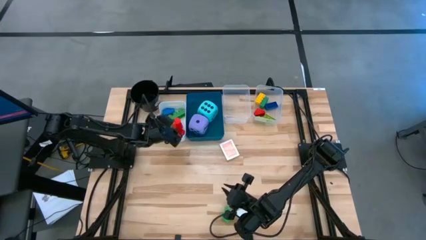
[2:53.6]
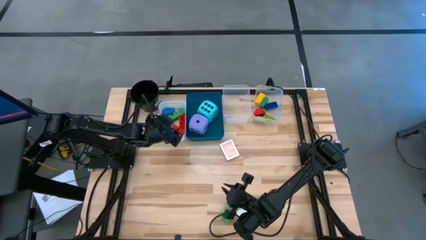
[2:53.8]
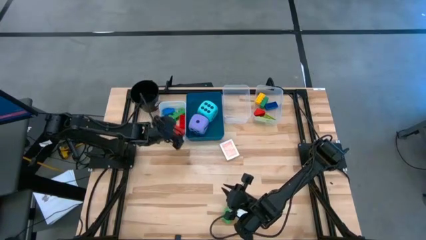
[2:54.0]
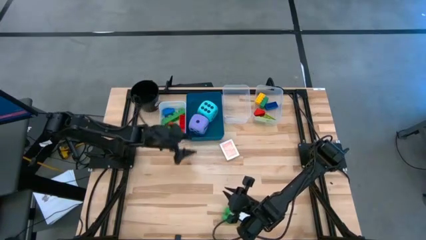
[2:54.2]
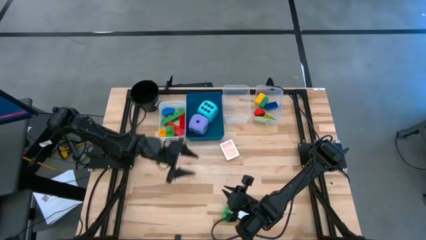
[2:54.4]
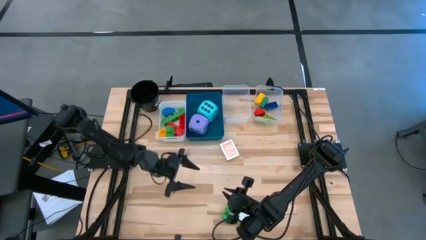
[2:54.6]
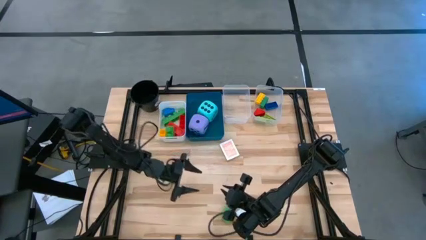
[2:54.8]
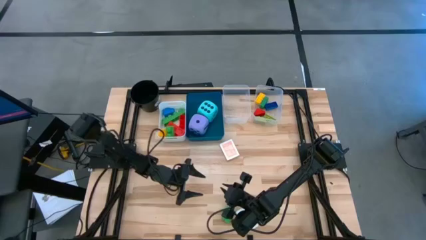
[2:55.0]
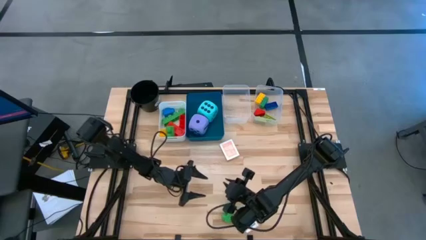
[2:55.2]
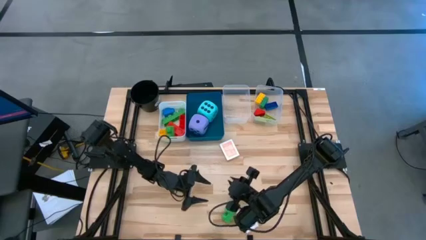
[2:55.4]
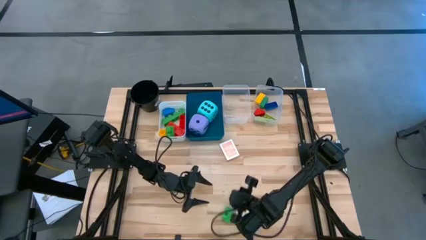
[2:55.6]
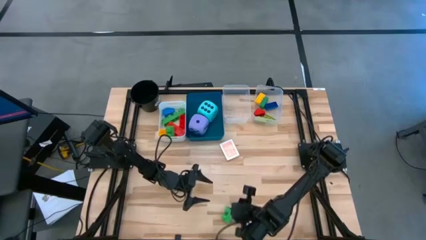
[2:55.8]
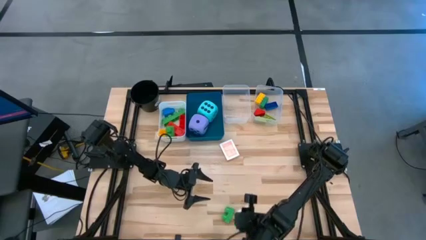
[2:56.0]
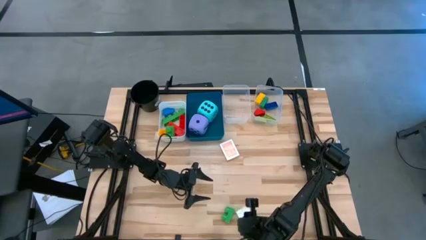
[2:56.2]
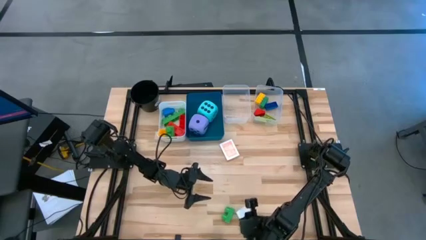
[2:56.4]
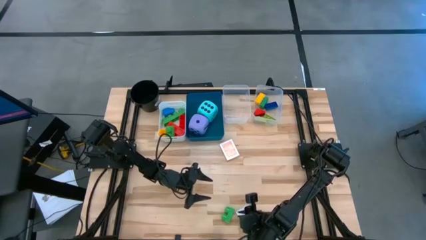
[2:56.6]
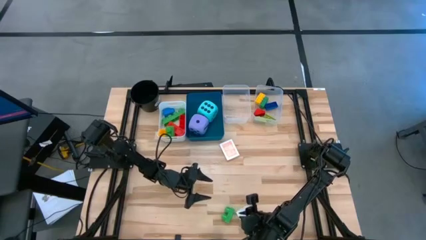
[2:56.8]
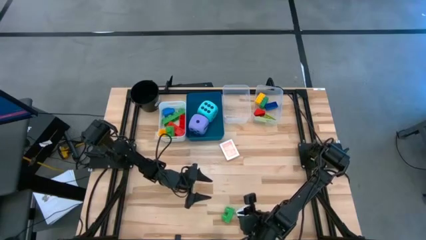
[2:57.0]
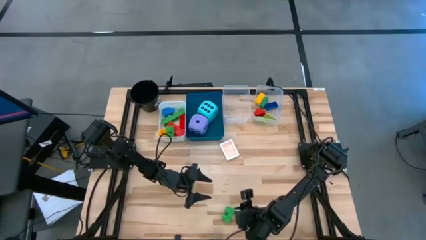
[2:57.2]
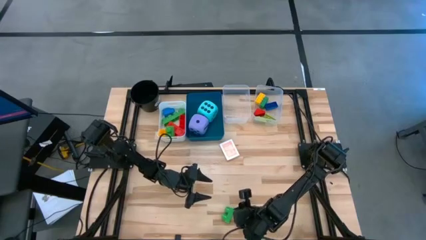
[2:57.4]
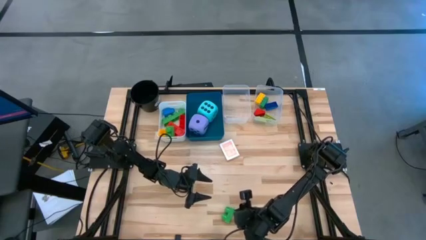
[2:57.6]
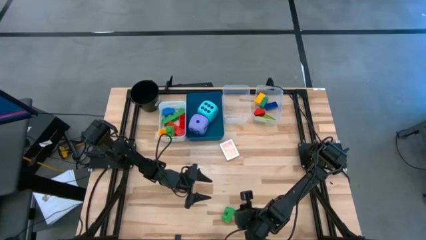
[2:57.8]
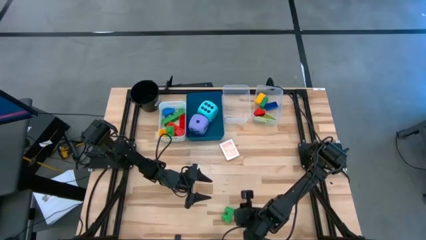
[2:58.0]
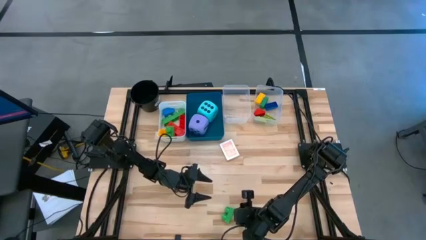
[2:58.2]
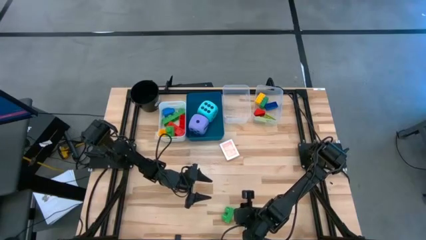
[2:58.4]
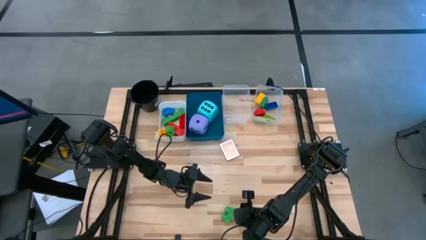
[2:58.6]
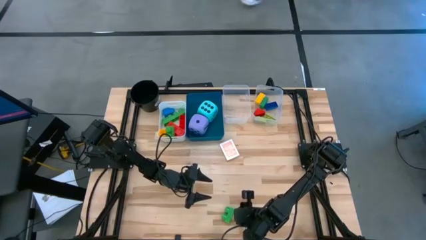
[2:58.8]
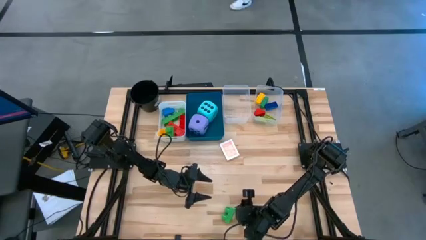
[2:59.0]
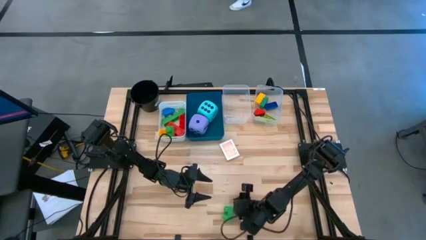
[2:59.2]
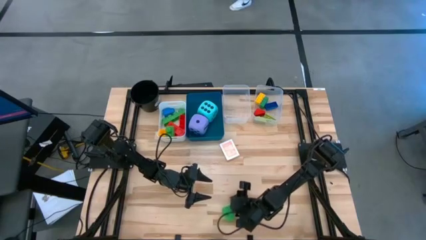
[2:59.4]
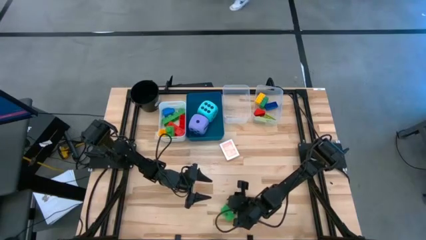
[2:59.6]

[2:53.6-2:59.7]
Task: Pick & Place Toys
Put the large green game piece into the white bin

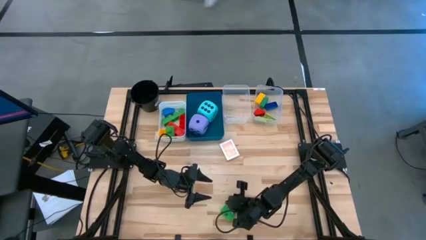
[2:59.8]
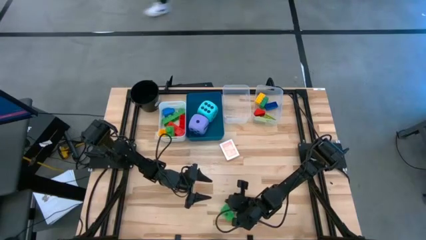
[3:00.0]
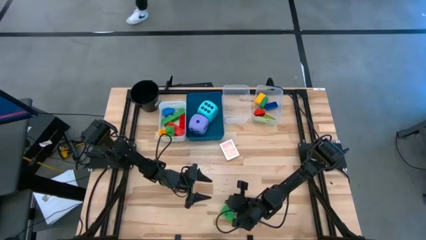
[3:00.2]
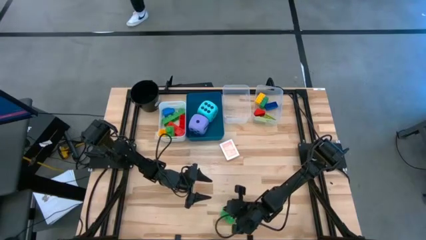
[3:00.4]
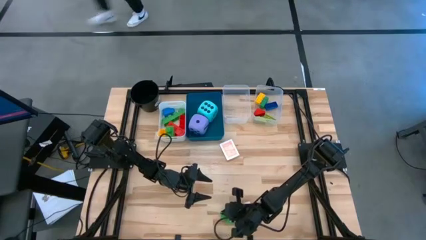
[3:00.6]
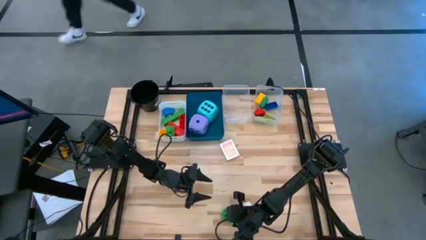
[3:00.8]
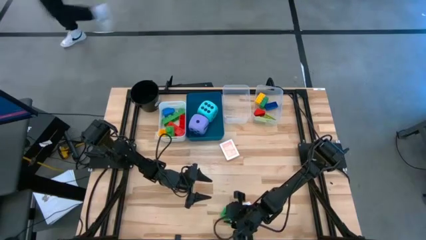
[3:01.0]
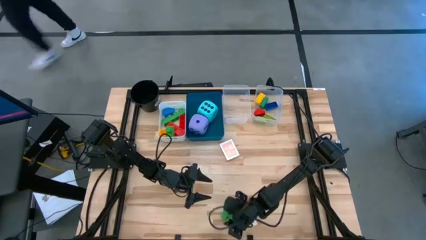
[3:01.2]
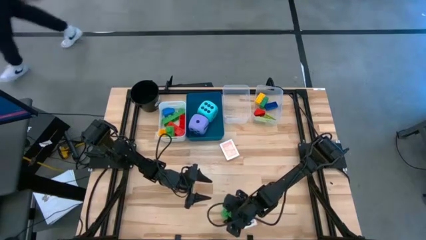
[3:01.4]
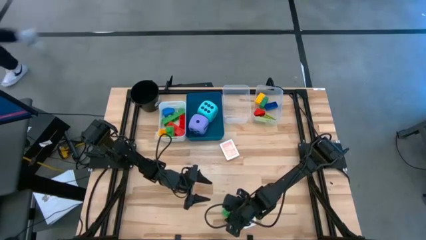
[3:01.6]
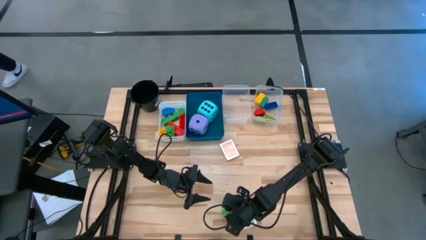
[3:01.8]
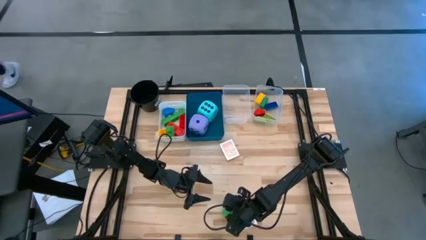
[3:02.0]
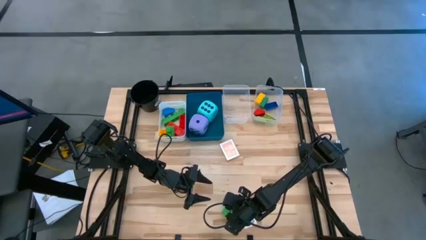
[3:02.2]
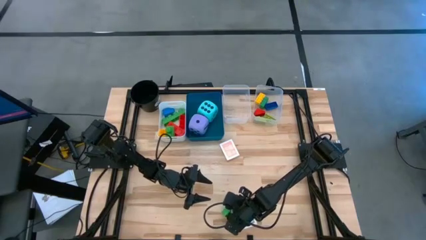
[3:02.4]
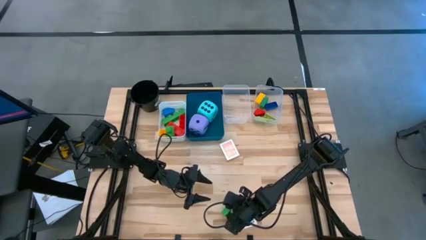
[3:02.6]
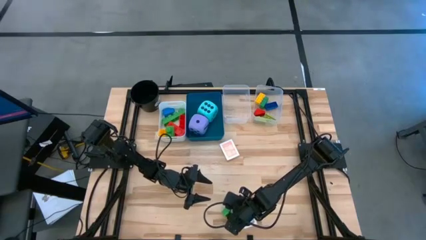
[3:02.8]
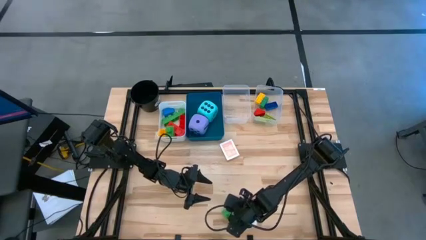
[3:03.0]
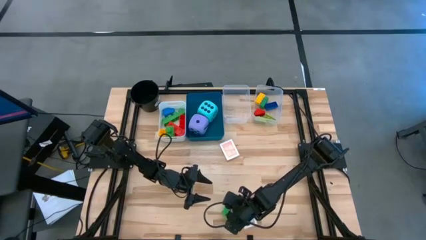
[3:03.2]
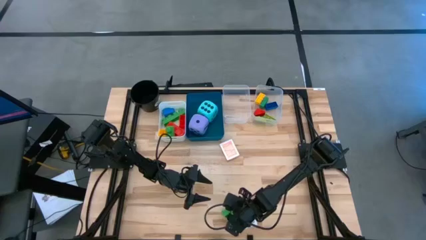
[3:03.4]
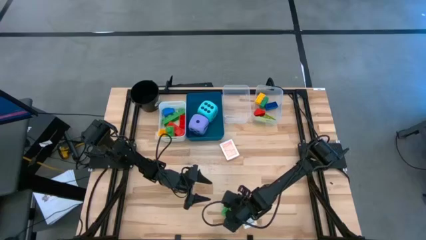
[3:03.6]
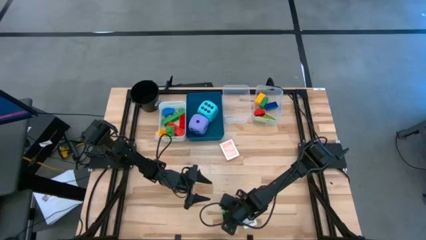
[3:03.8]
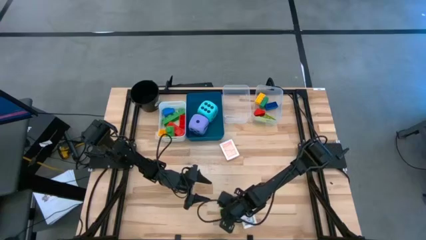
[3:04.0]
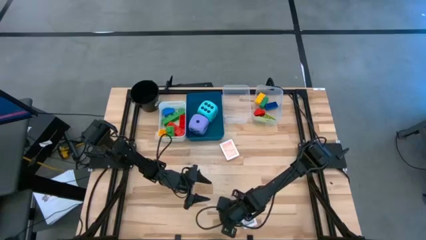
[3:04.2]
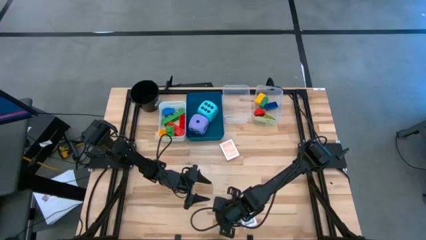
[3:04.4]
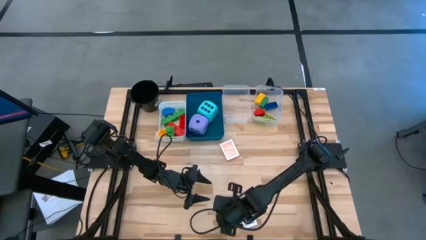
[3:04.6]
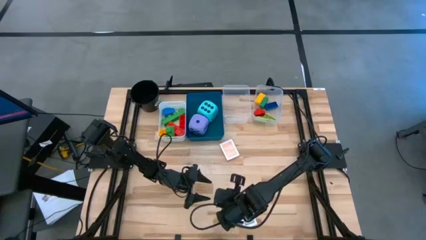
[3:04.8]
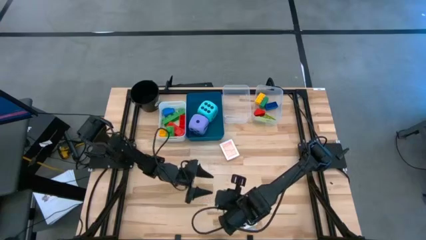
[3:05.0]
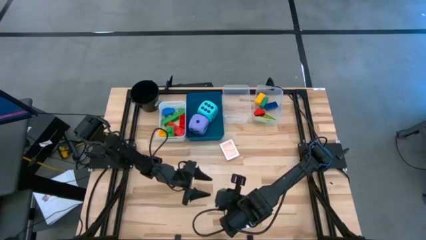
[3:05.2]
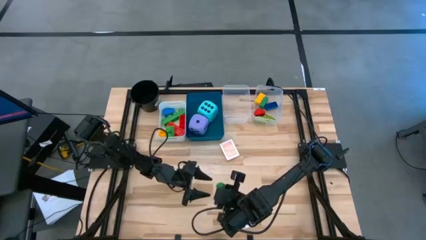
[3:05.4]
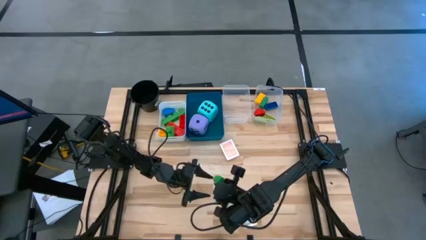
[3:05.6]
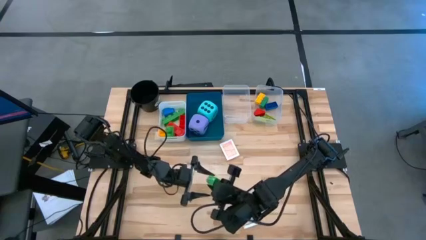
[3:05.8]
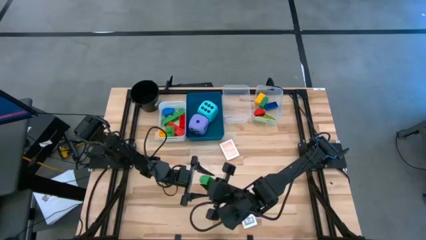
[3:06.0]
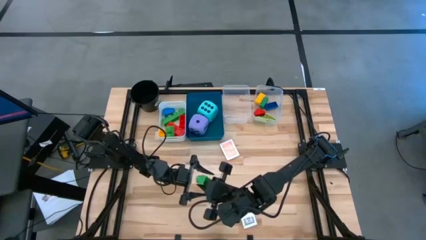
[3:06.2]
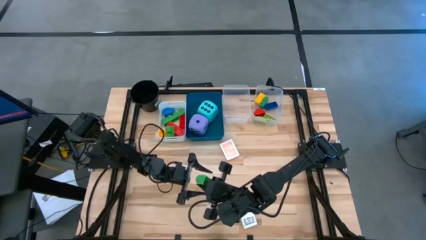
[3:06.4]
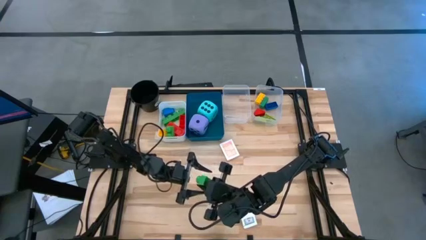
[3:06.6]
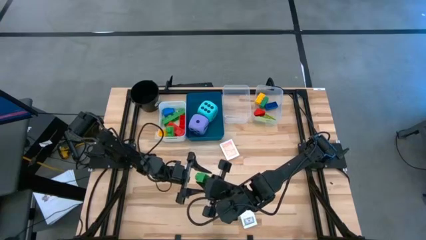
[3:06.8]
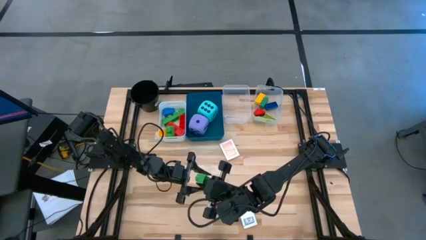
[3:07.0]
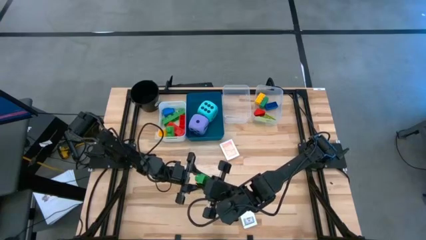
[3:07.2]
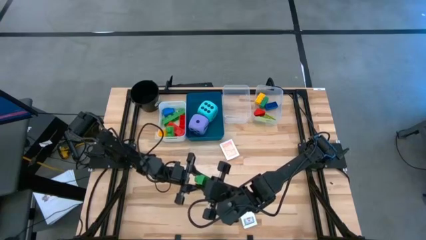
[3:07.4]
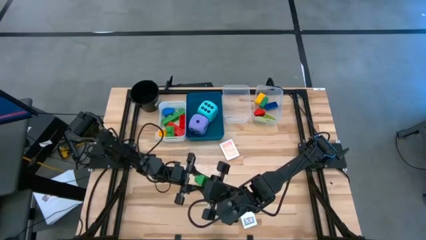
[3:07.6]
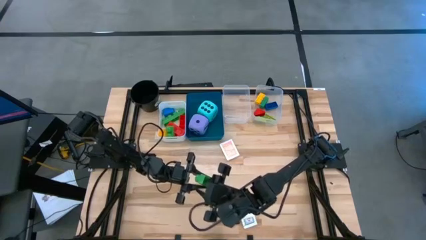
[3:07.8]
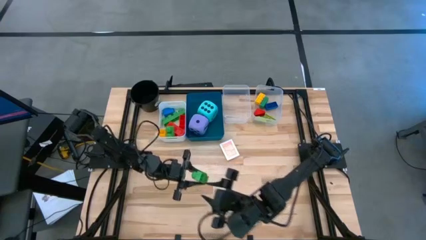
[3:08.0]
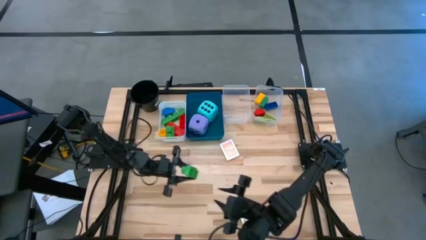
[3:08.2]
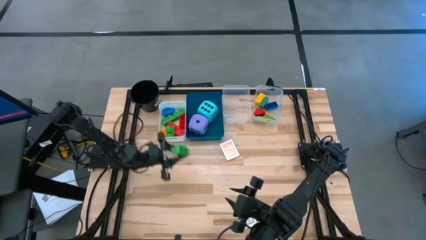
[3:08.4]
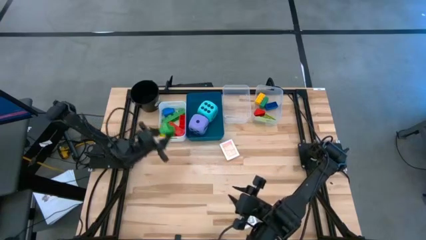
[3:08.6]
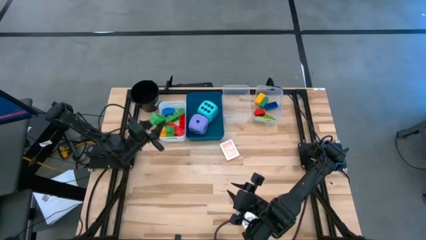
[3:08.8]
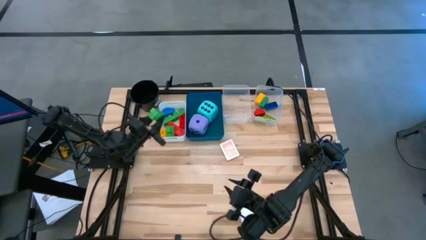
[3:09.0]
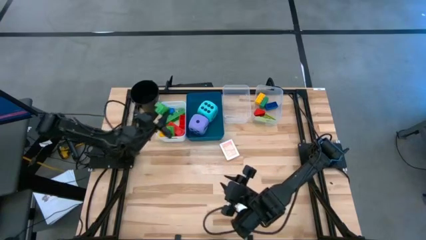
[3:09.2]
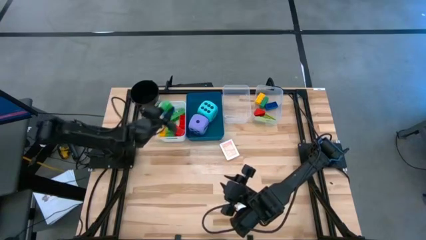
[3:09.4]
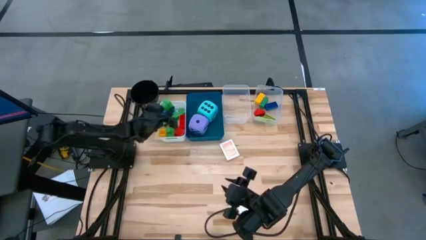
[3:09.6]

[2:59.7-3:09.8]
Put the large green game piece into the white bin

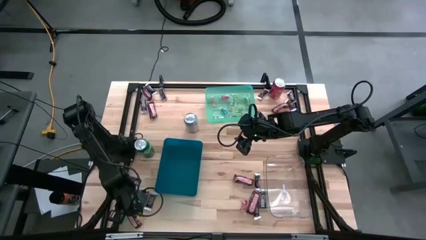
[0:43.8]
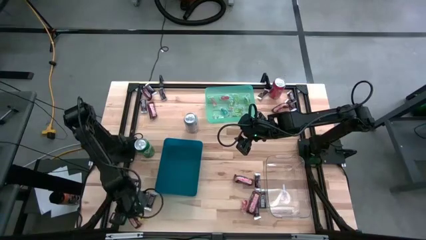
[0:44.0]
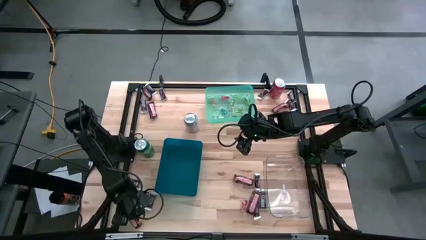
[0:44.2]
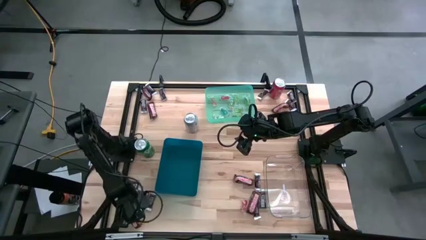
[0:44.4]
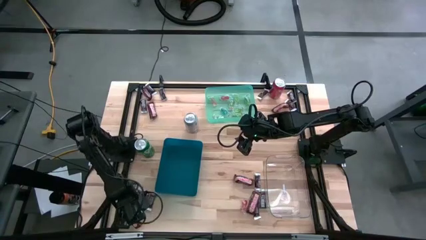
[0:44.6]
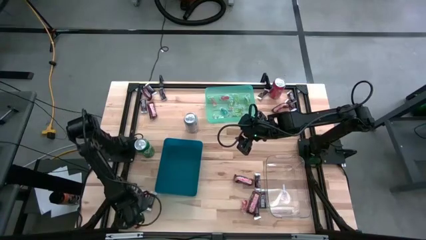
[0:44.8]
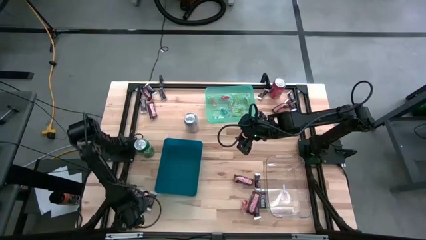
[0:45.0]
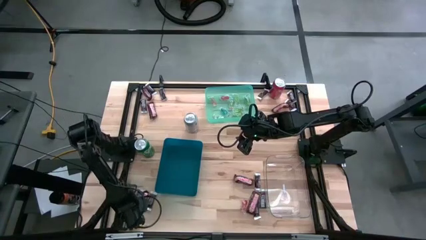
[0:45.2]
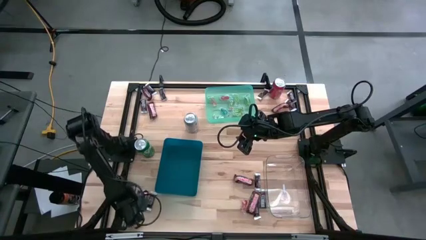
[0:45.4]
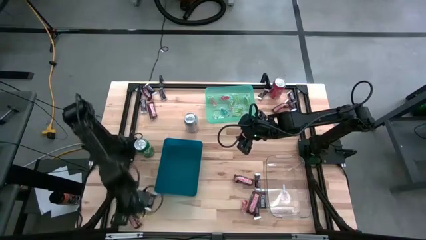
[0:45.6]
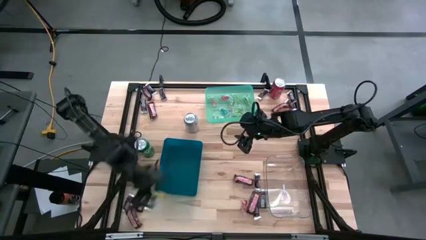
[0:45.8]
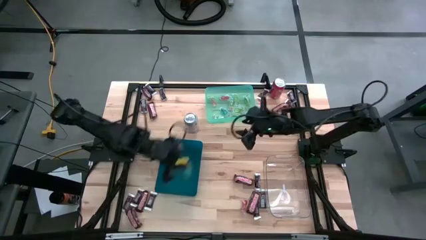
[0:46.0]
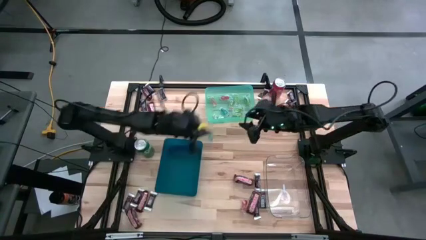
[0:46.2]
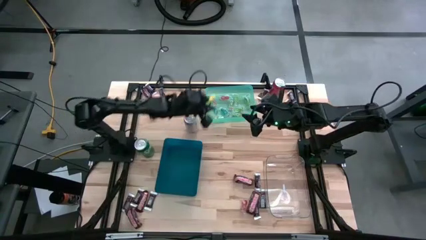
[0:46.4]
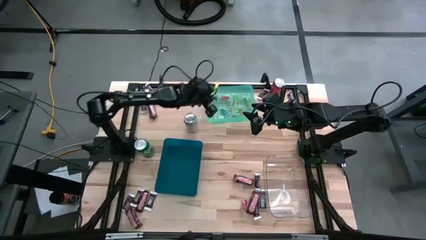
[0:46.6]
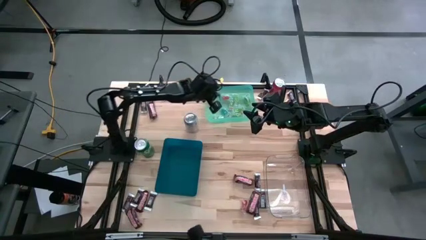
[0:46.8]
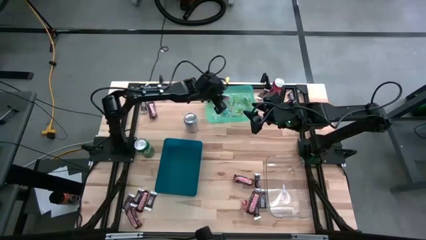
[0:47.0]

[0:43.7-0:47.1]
Task: Organize candy in baskets
Put the transparent gummy into the green bin
